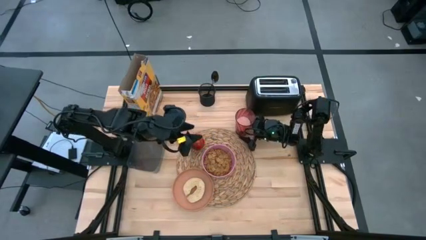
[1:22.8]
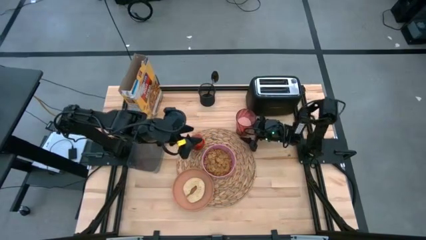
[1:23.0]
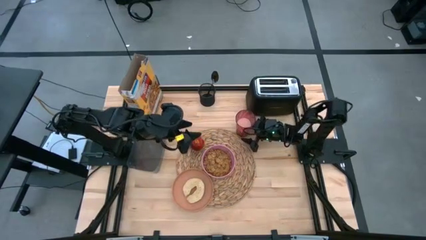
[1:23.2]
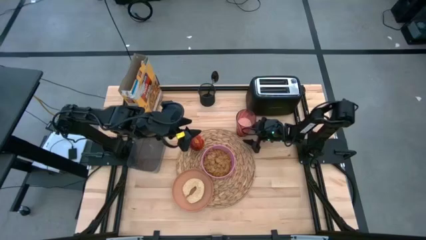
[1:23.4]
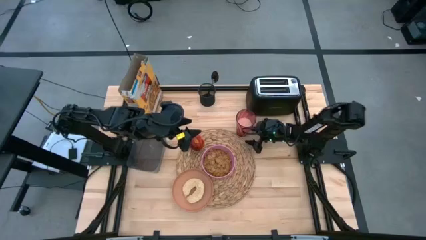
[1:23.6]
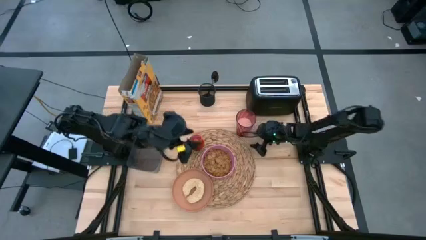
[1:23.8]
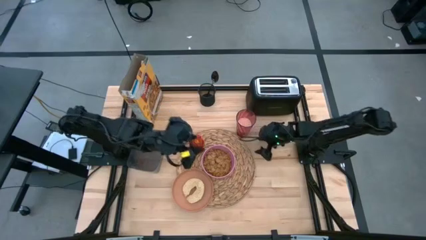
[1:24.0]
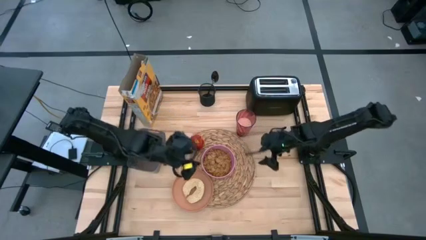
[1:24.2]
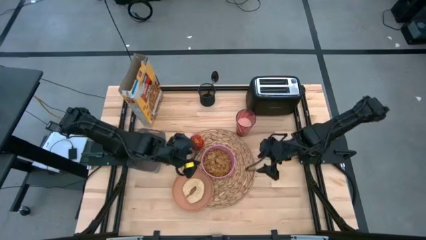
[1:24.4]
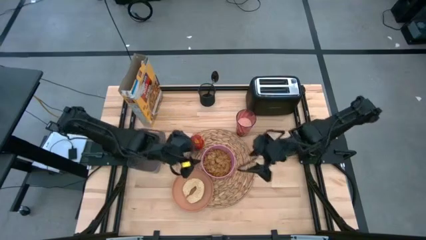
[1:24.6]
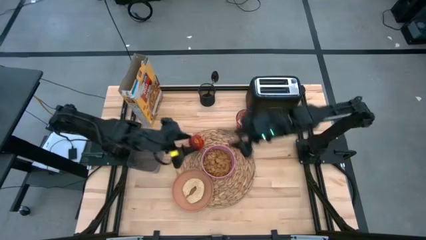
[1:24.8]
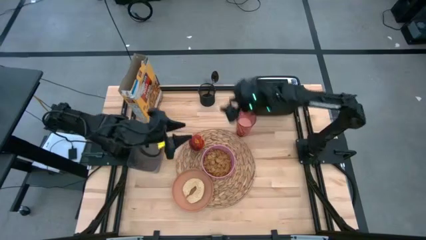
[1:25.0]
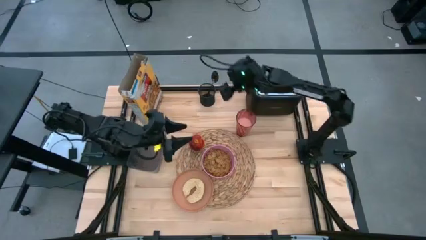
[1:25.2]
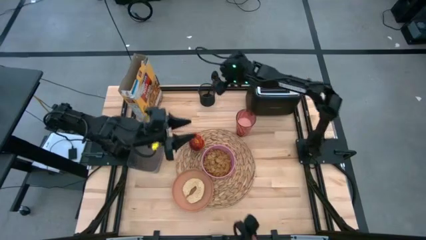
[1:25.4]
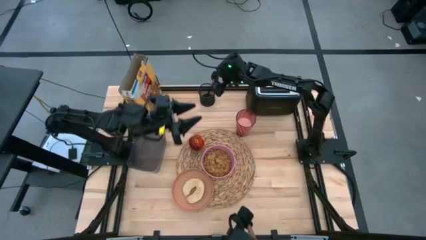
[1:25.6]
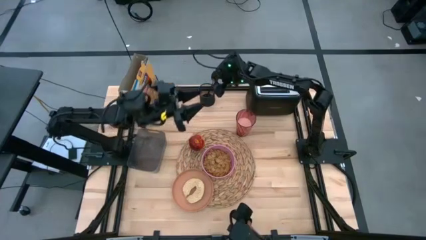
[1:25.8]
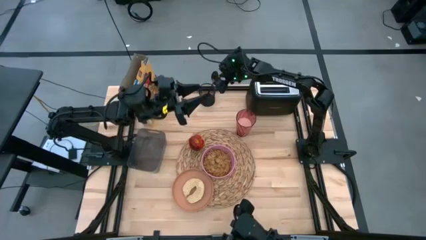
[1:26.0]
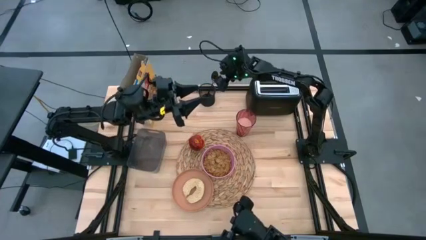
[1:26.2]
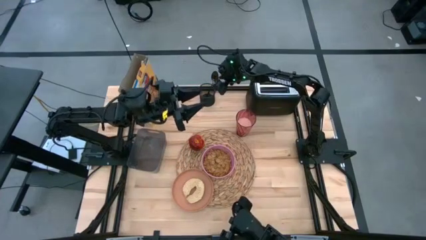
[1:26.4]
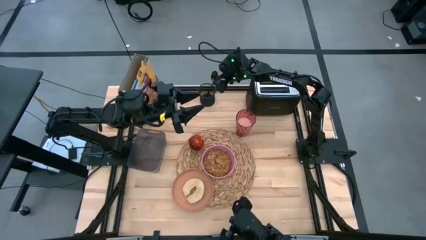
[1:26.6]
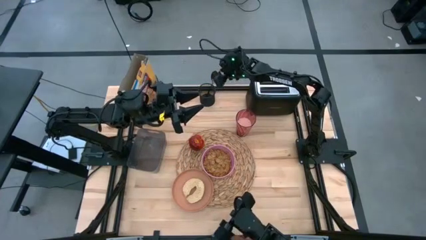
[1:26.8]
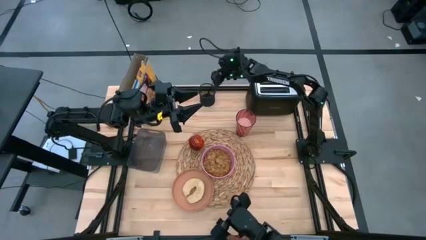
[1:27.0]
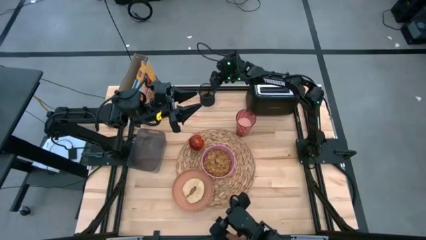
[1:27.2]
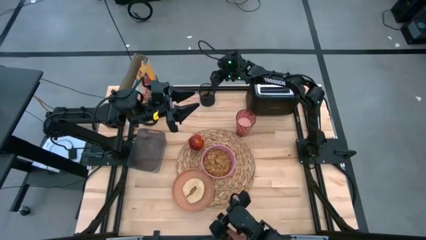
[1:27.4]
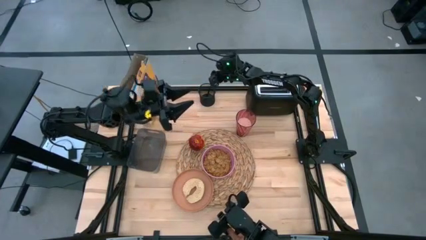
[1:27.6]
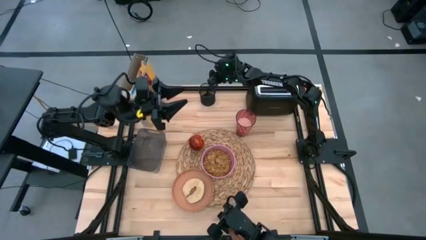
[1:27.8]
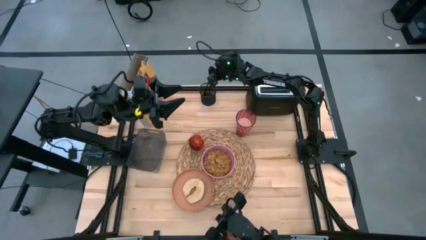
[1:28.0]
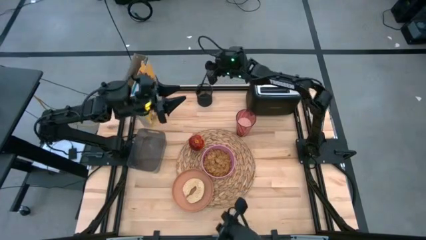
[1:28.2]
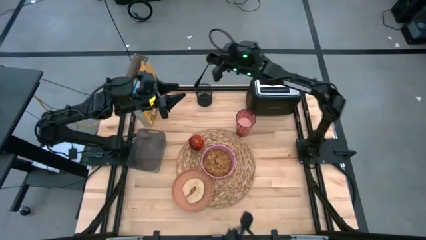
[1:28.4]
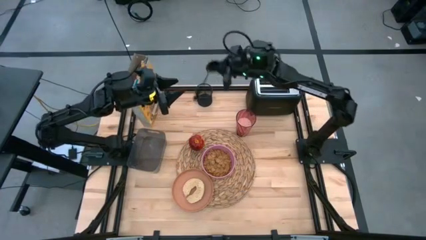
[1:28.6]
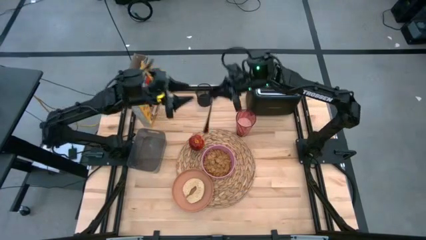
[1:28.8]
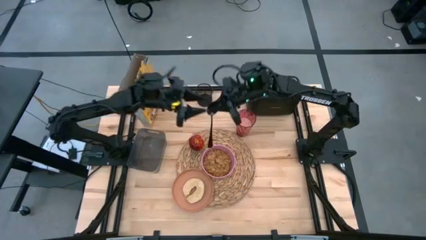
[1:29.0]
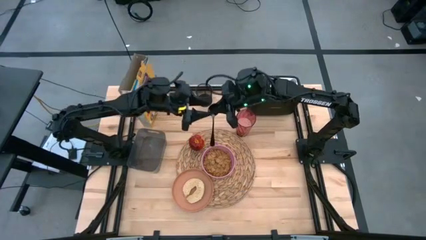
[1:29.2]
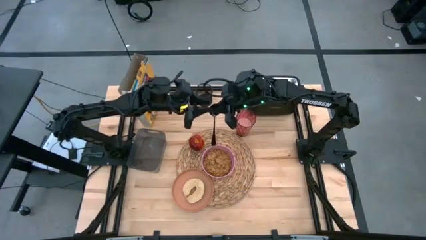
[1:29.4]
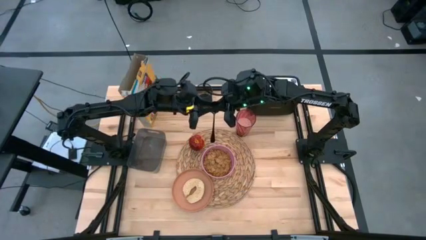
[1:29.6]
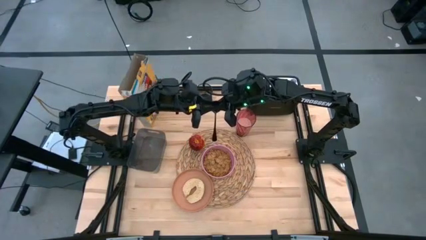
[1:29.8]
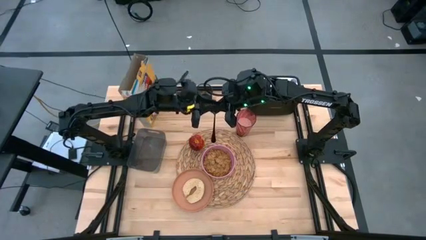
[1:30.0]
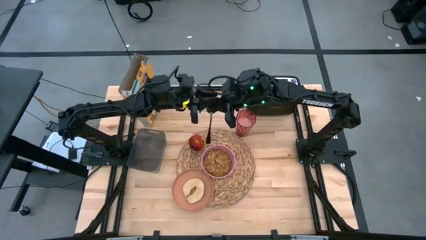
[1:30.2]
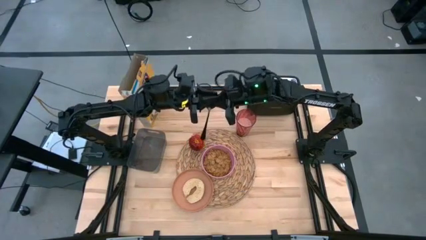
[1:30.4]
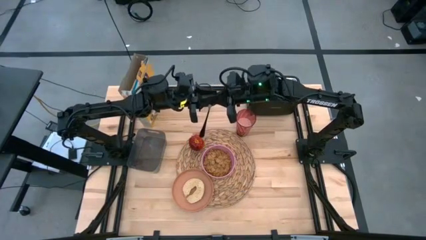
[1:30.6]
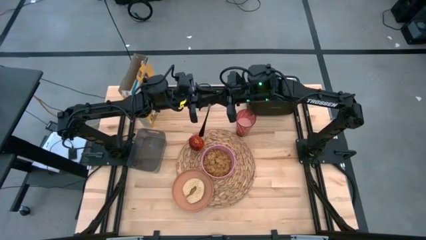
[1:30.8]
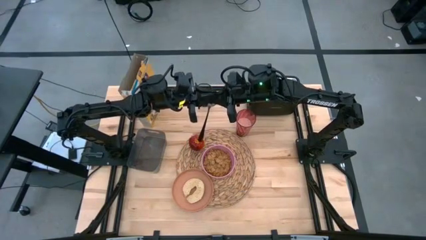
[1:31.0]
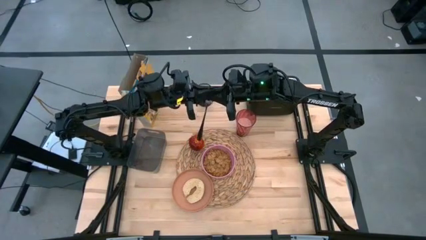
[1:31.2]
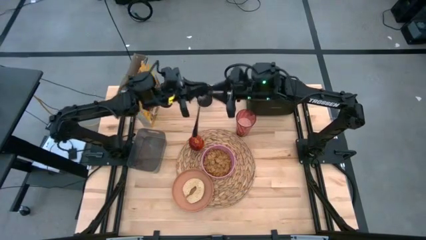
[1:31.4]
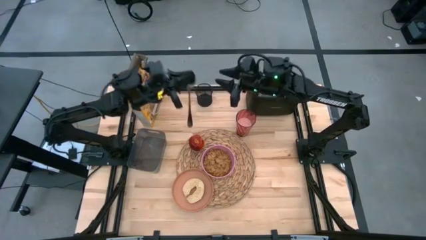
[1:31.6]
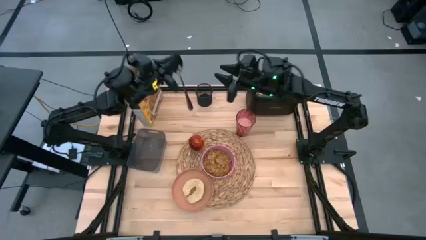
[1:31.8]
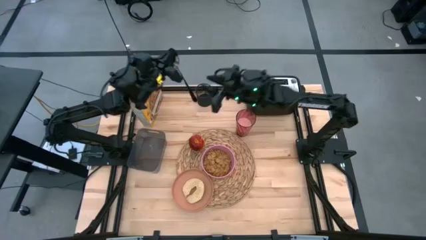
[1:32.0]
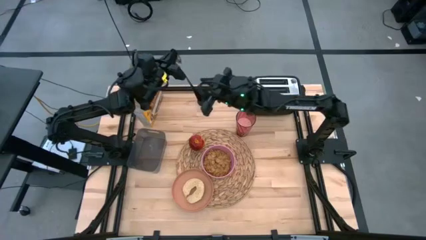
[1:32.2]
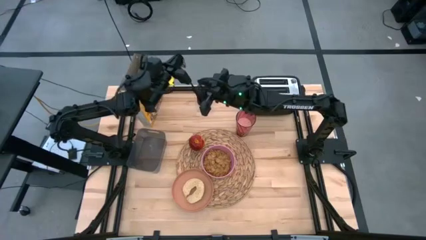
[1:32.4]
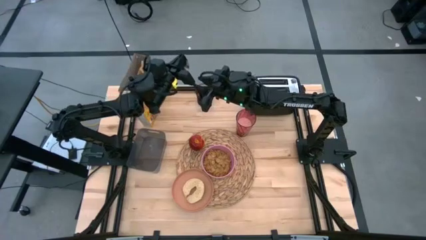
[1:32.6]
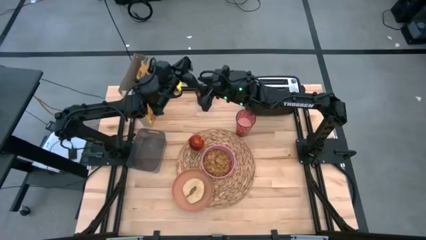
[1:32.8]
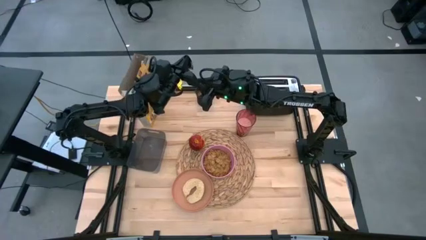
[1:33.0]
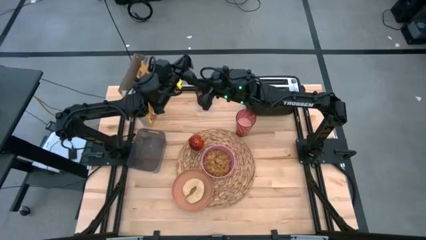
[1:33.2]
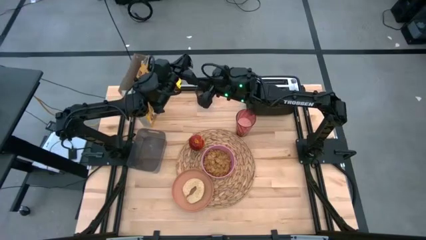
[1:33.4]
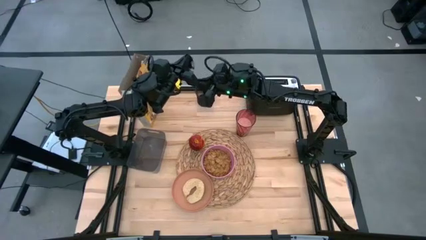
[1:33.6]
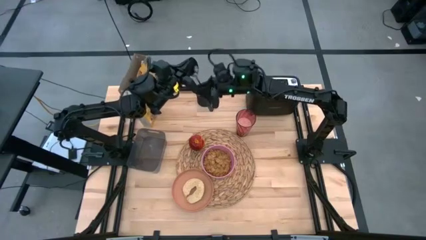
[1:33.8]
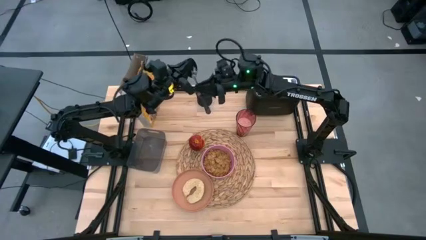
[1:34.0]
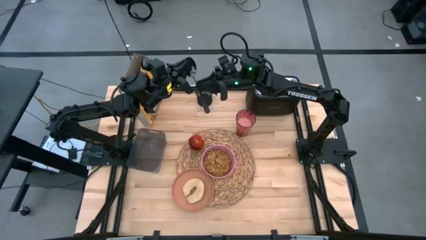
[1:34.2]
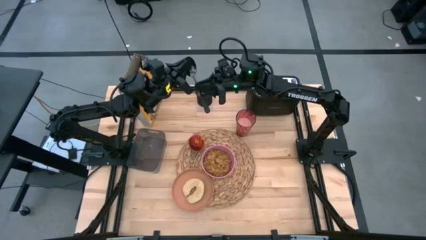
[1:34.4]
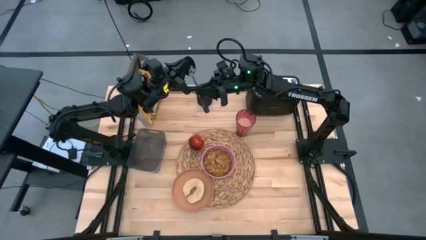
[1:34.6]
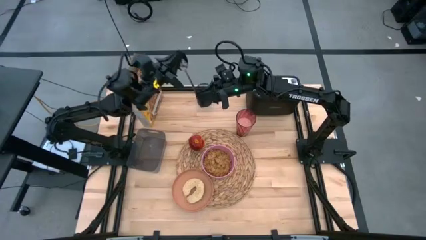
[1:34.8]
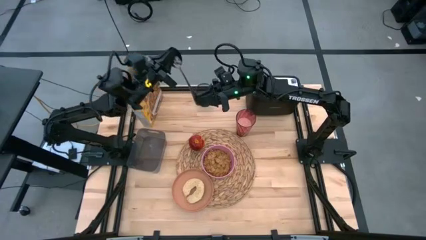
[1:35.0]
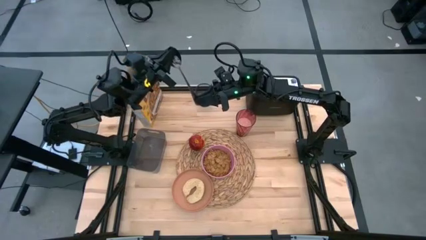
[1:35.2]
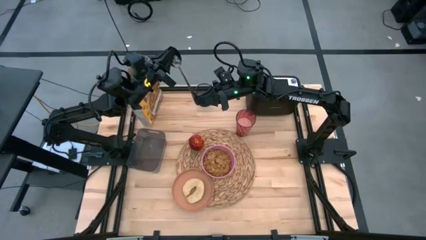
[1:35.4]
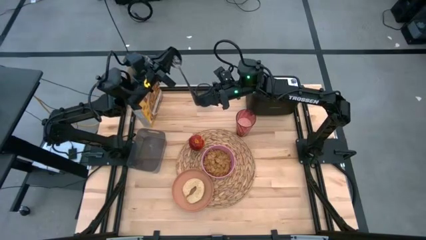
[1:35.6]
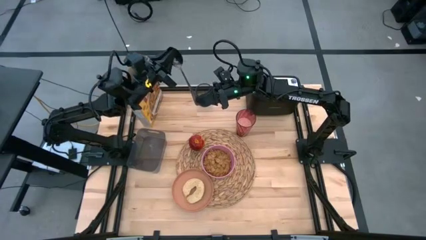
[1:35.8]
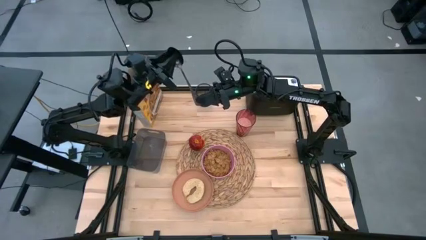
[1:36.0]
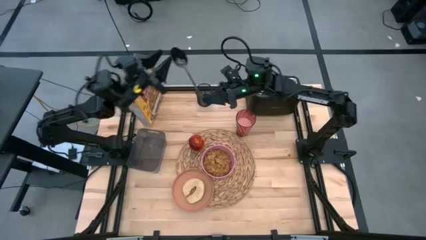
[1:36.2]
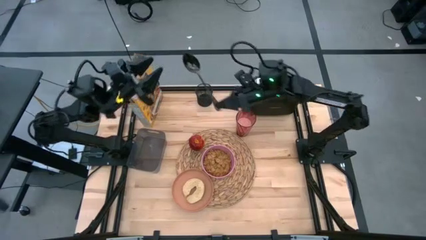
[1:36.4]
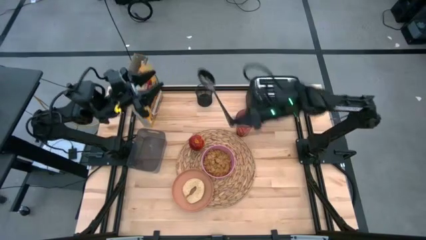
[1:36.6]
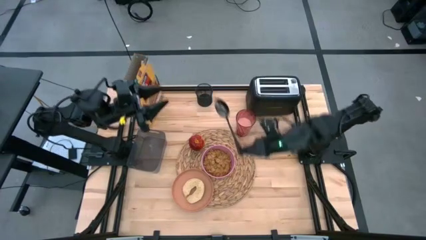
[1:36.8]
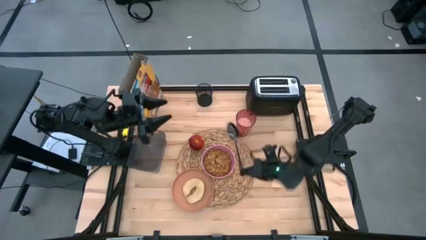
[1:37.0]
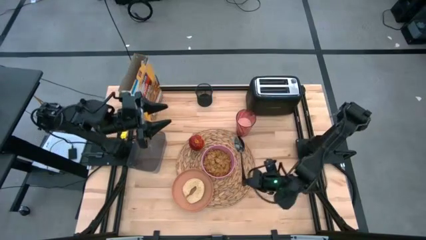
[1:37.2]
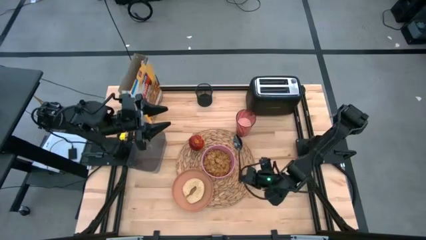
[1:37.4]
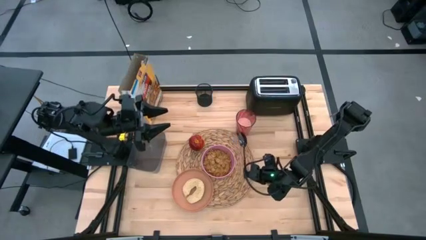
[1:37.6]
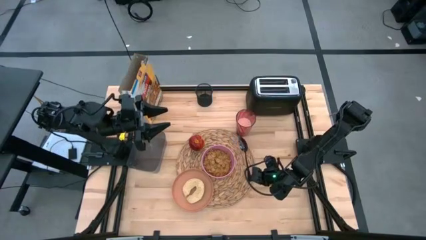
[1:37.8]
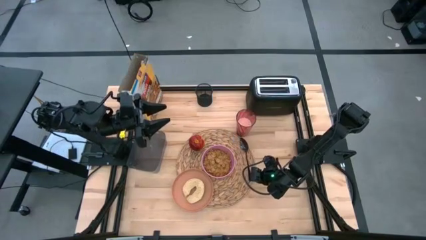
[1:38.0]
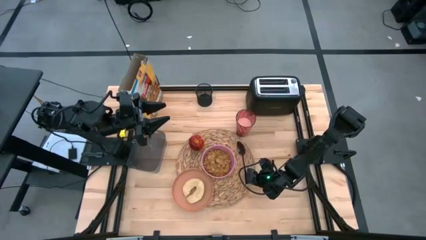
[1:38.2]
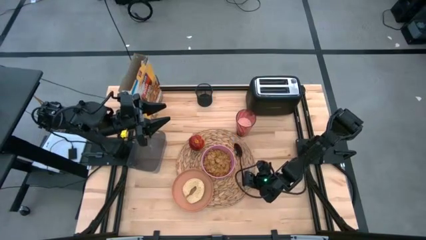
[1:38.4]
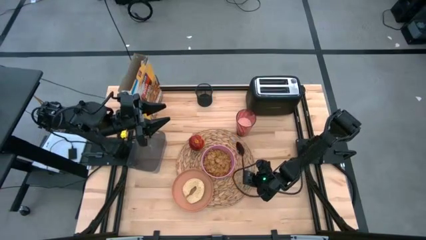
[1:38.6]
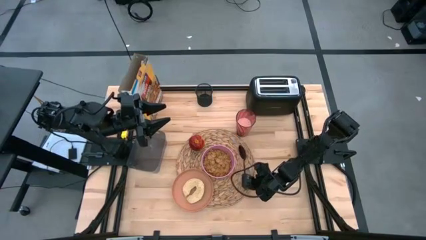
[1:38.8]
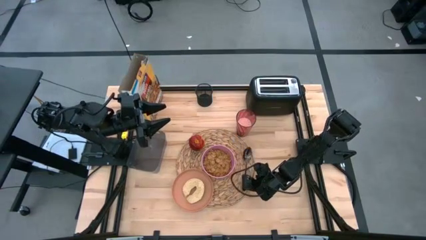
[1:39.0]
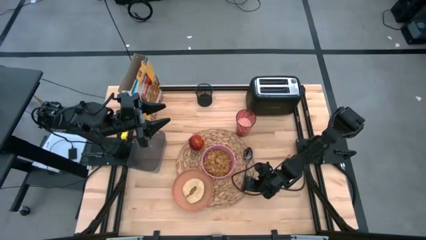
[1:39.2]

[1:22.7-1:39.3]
Task: Arrange a breakfast setting
Put the spoon on the right side of the pink bowl on the brown placemat
